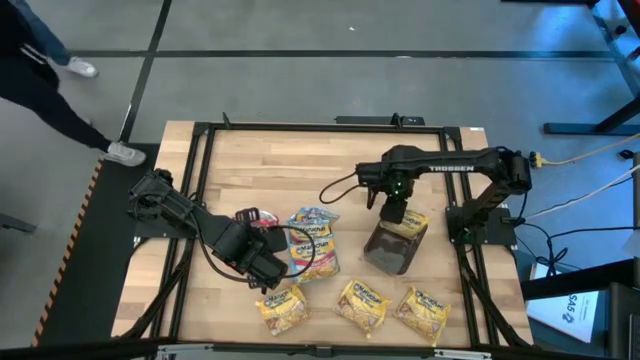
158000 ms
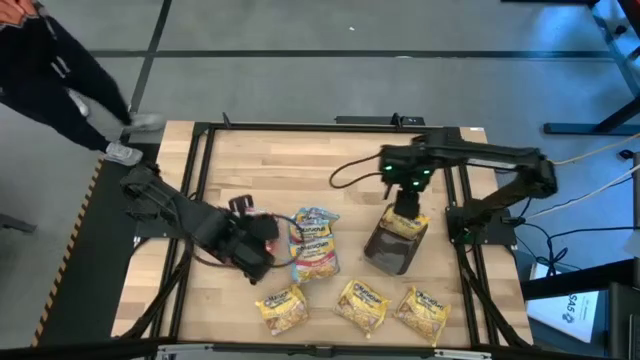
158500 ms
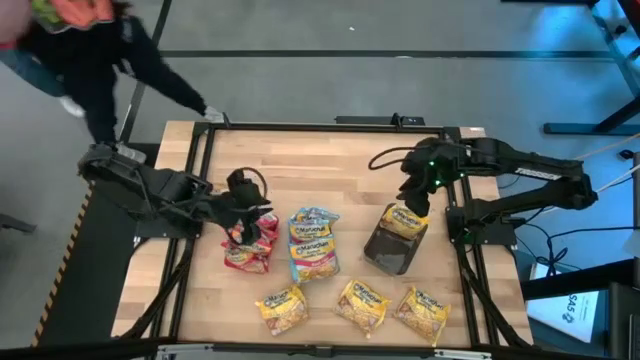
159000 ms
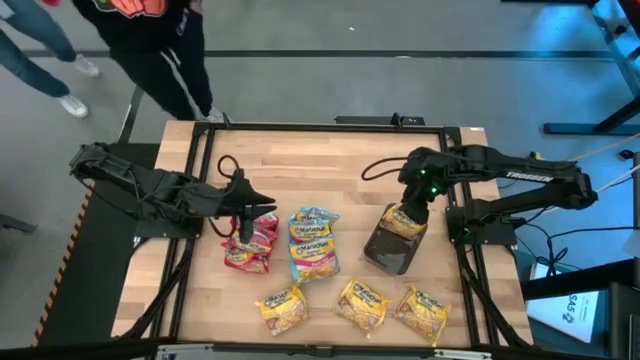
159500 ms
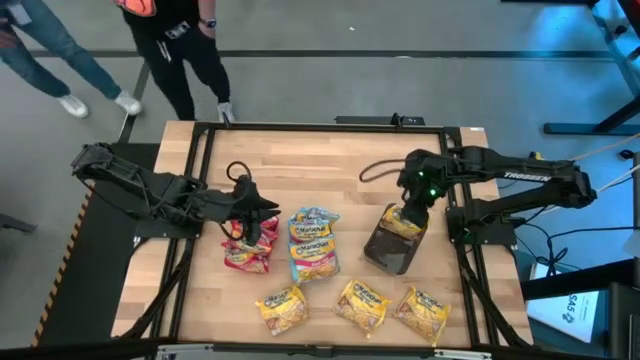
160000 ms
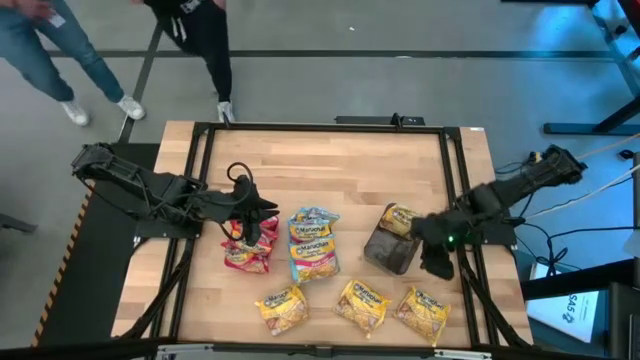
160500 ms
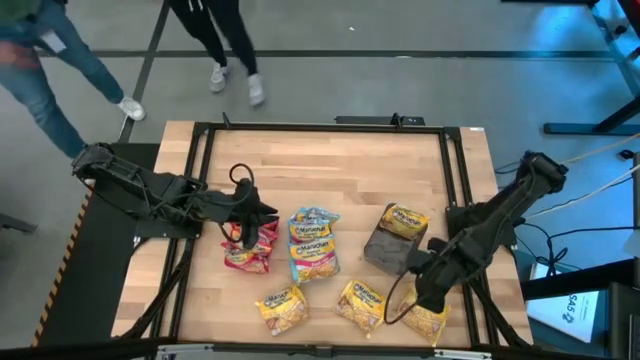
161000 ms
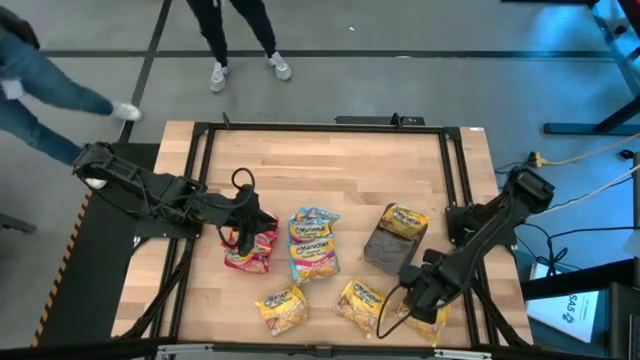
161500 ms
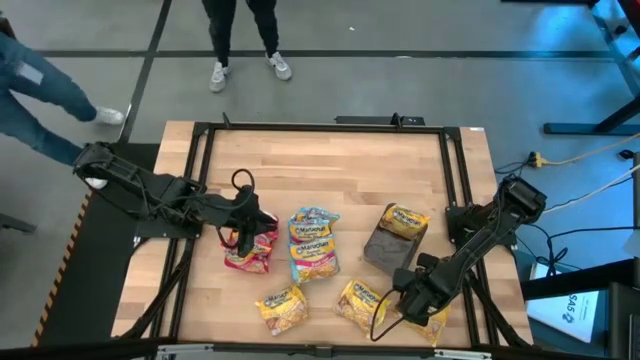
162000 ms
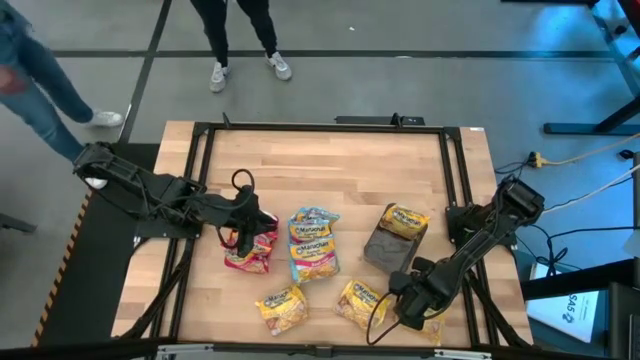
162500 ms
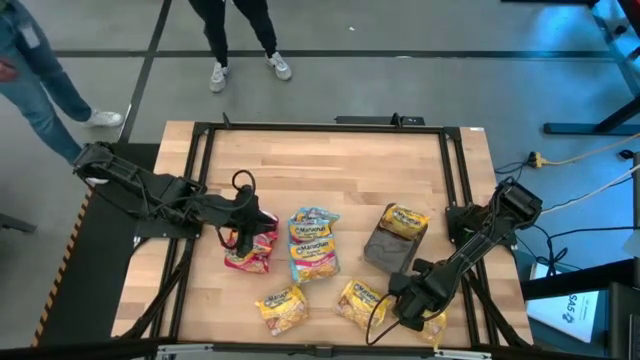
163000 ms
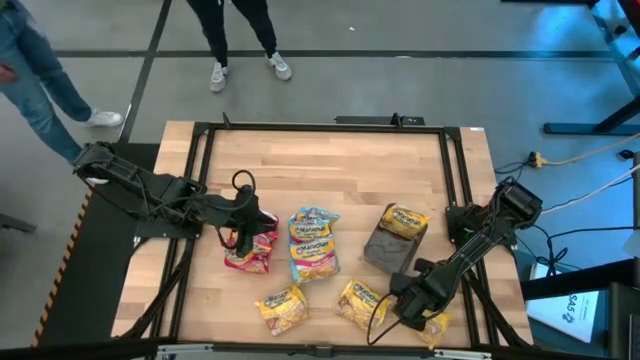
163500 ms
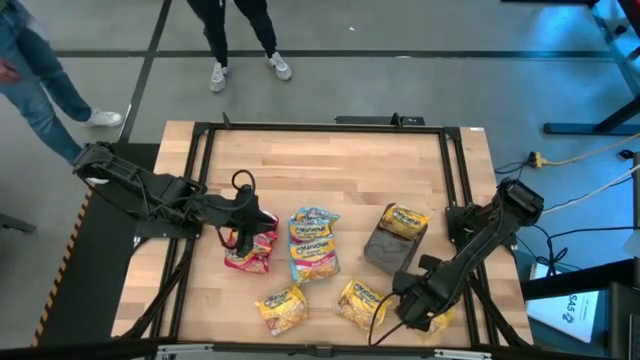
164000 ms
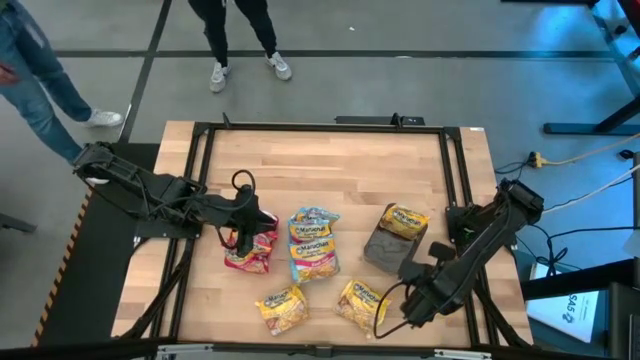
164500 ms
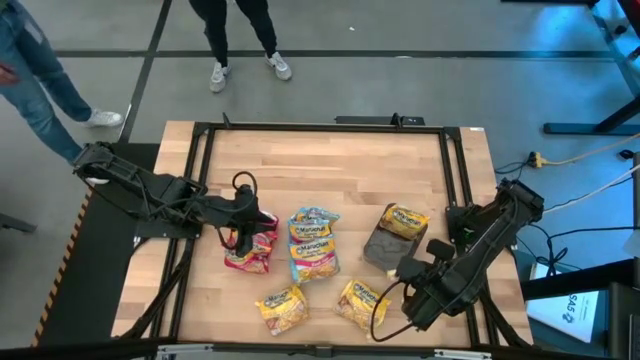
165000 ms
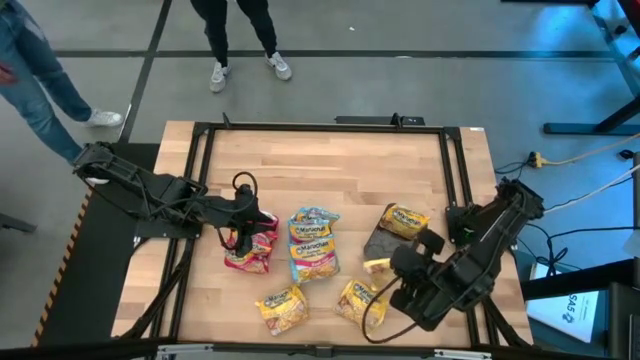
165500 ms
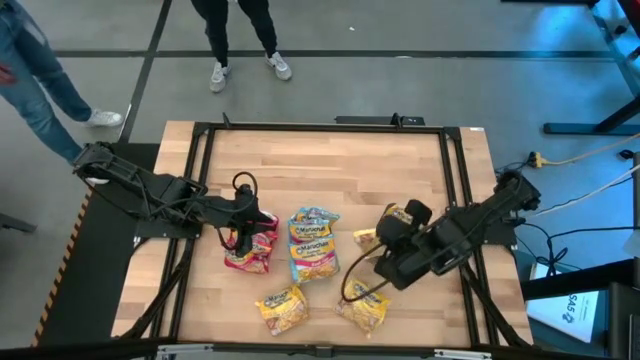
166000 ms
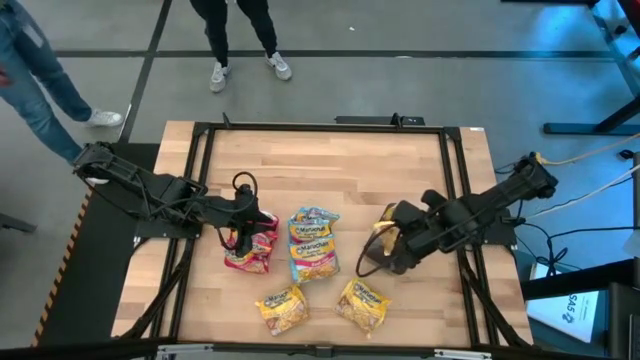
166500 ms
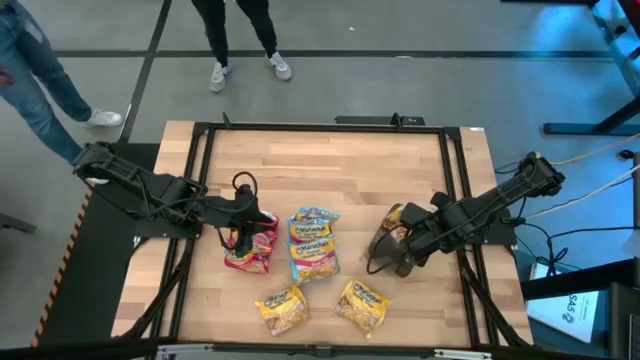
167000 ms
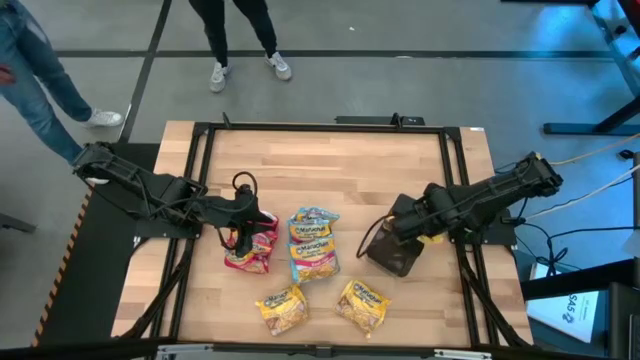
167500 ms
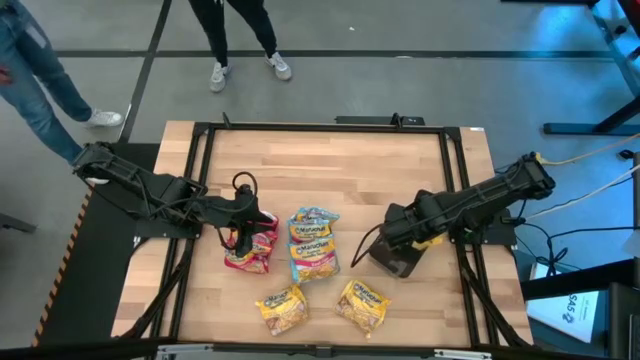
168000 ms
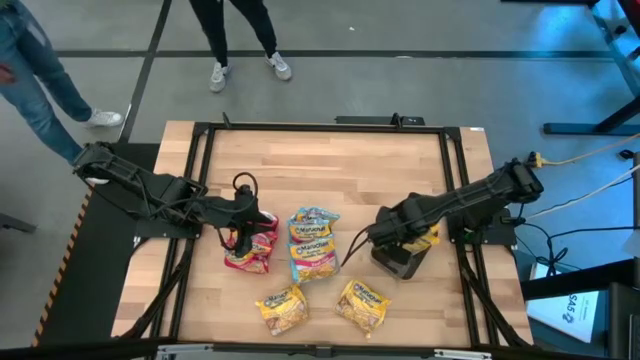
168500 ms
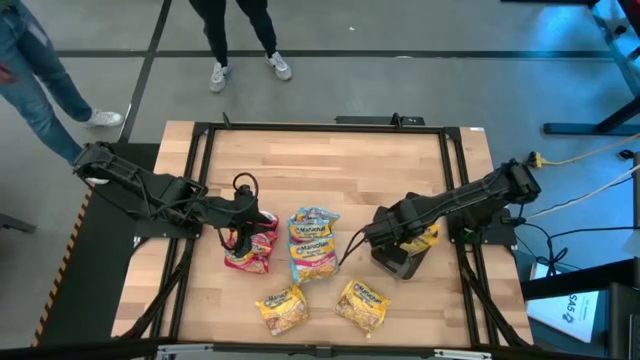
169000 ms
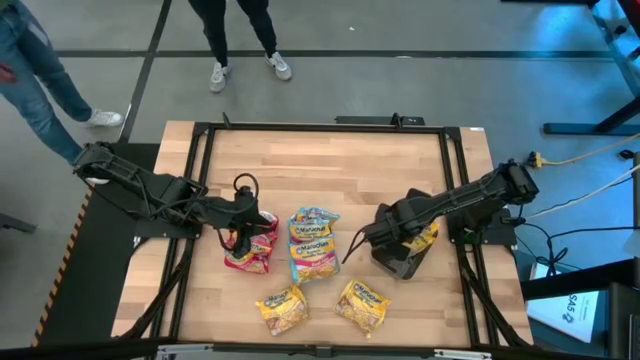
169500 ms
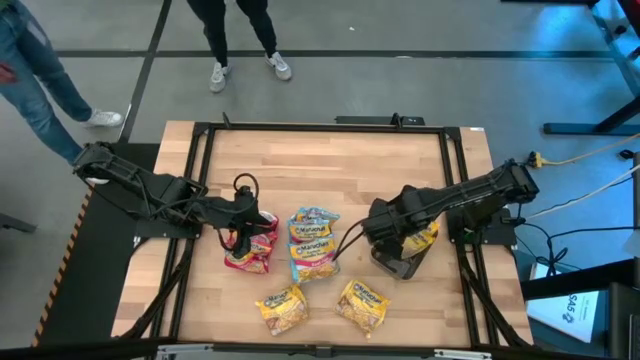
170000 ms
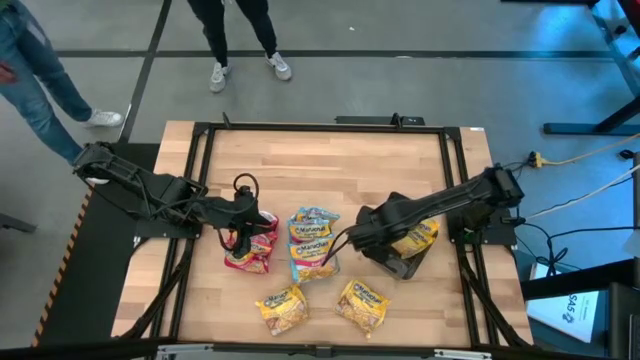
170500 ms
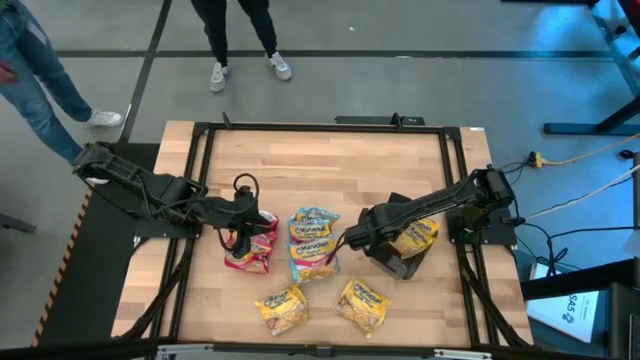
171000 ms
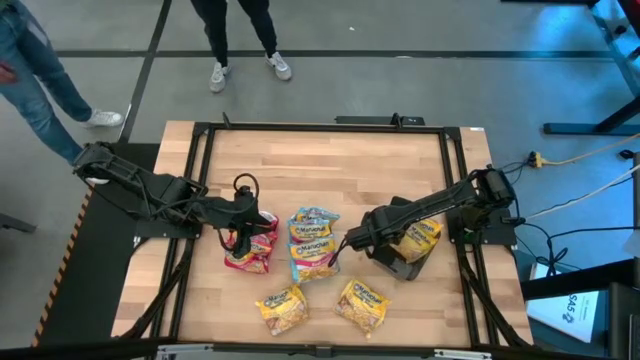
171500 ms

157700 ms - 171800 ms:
Task: Sort Maruchan noodles
Put the yellow noodle pack into the black bin

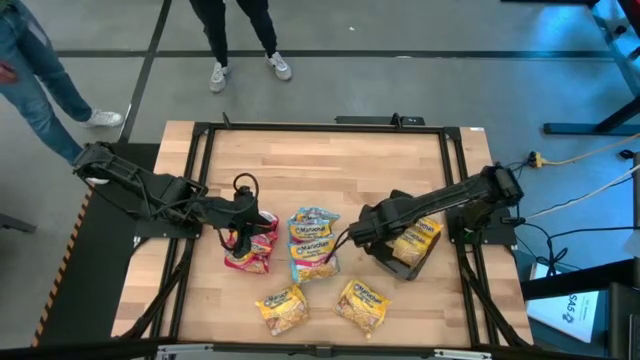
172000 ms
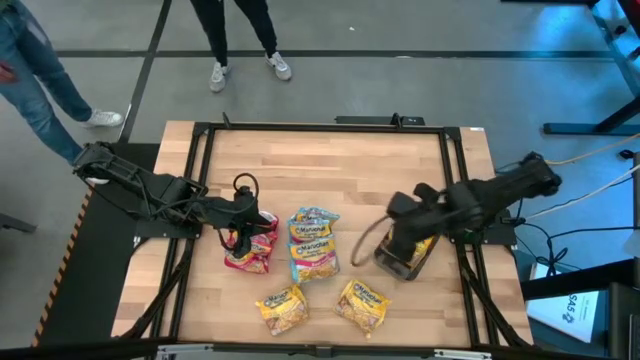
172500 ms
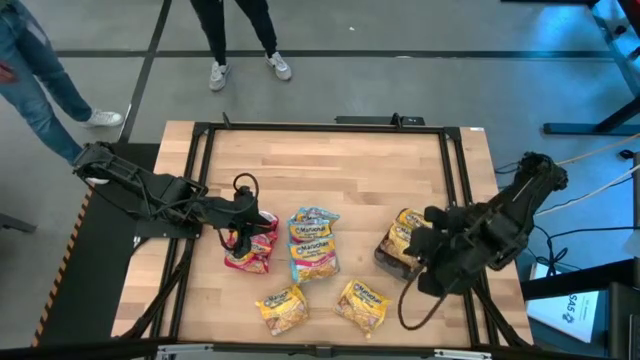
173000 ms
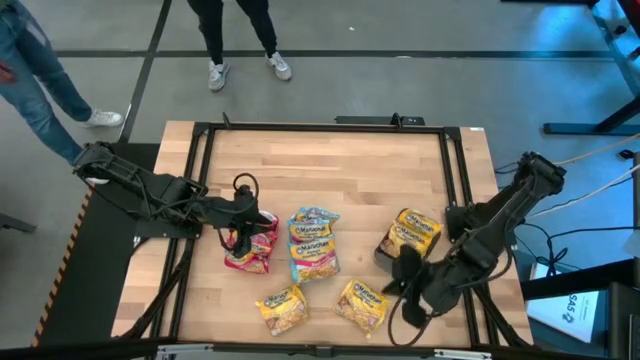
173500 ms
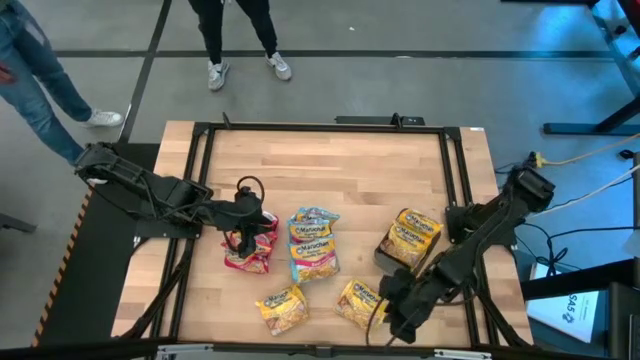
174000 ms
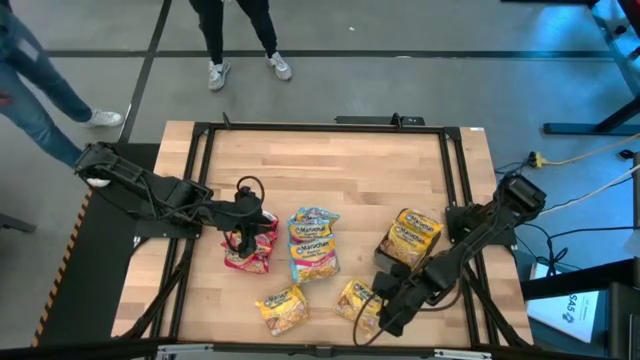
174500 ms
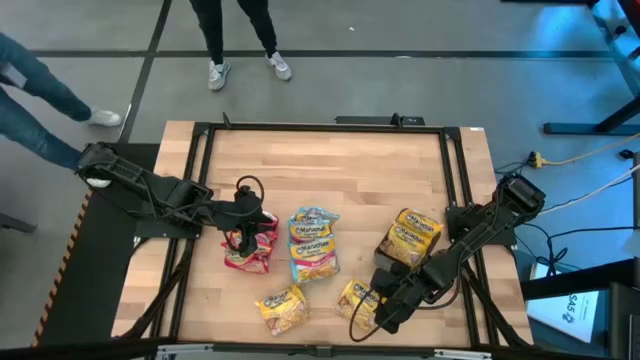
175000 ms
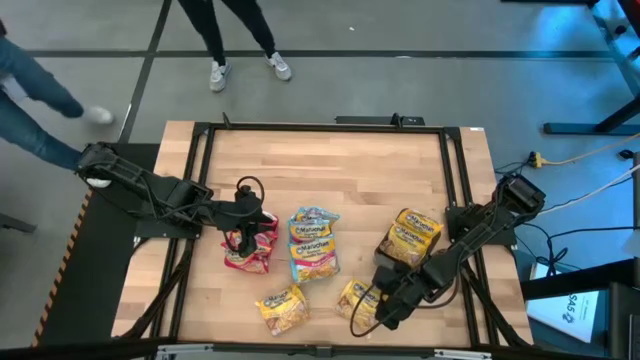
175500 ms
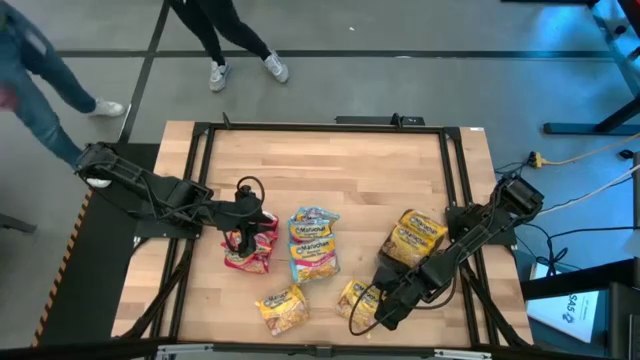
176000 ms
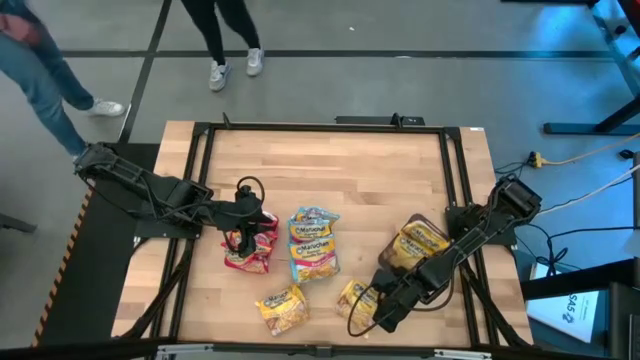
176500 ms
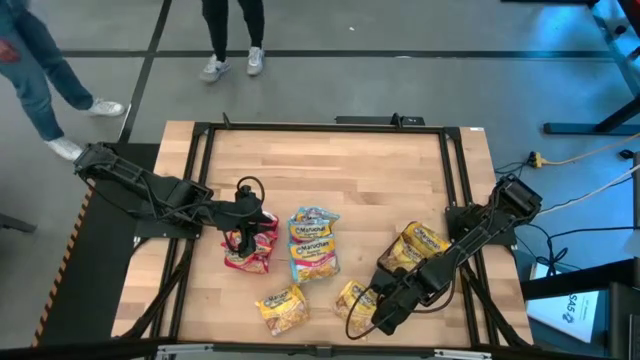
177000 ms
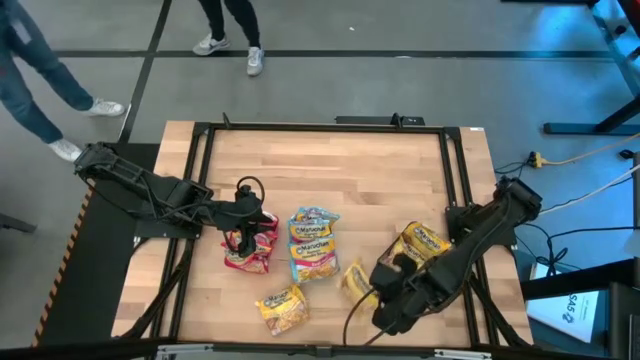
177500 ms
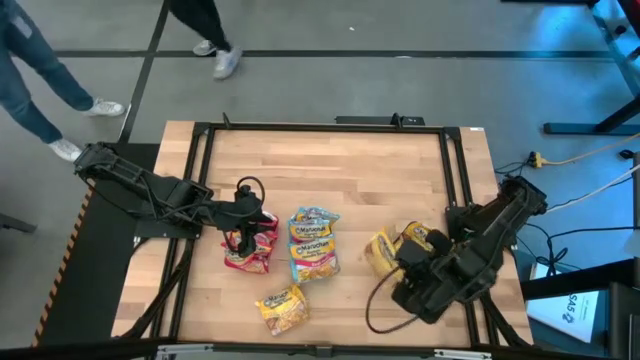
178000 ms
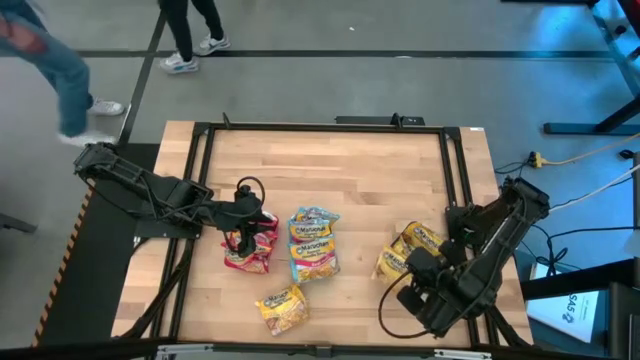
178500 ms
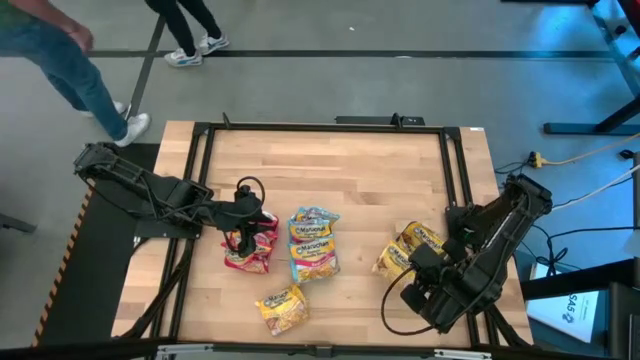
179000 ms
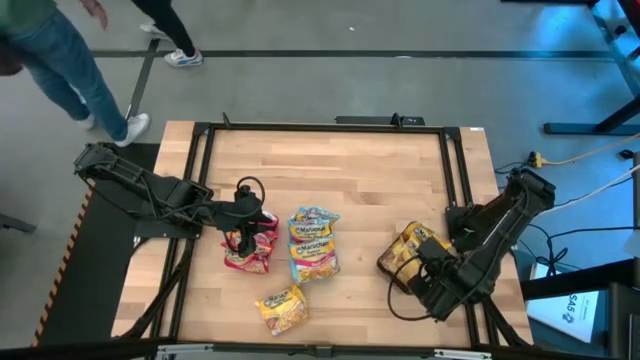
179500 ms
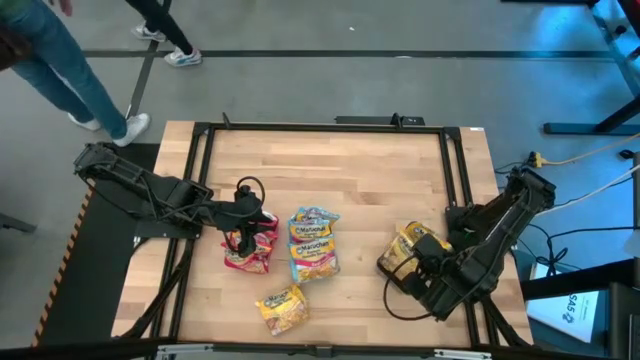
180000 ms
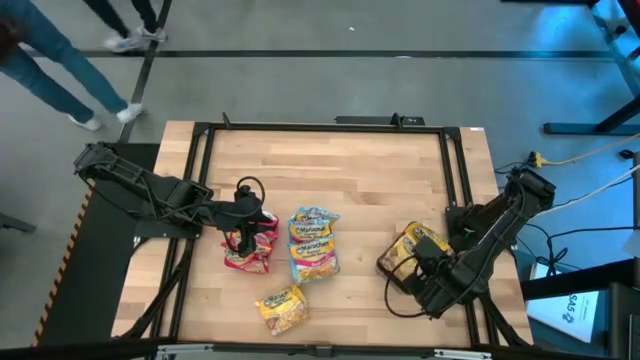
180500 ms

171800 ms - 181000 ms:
Put the yellow noodle pack into the black bin
